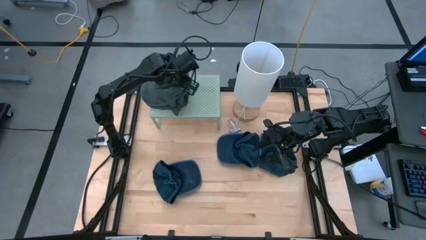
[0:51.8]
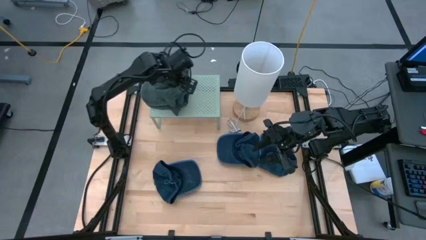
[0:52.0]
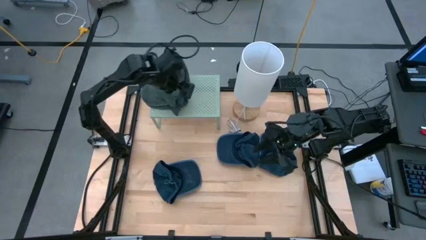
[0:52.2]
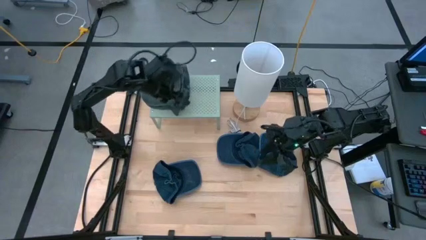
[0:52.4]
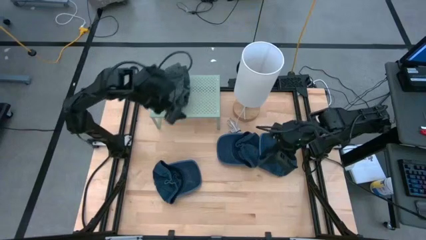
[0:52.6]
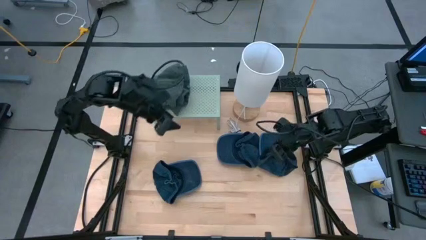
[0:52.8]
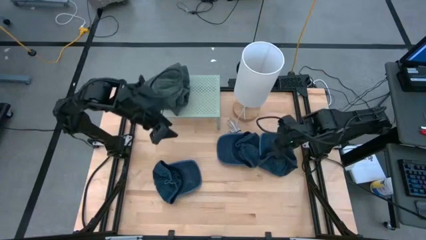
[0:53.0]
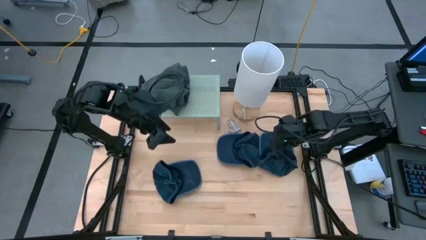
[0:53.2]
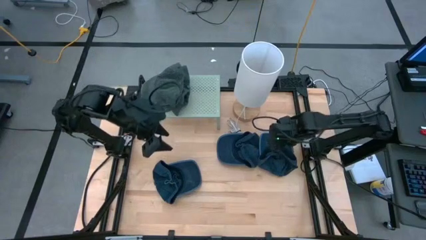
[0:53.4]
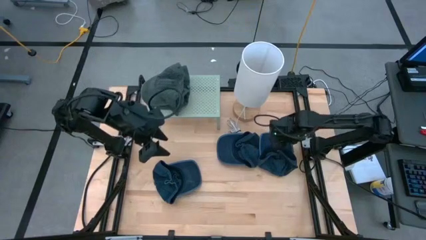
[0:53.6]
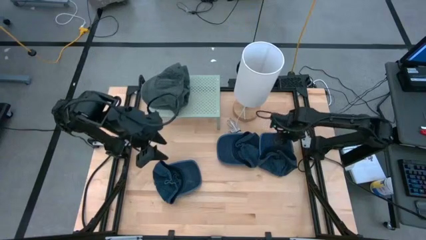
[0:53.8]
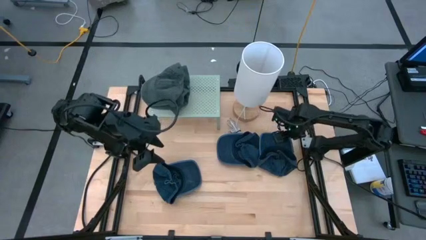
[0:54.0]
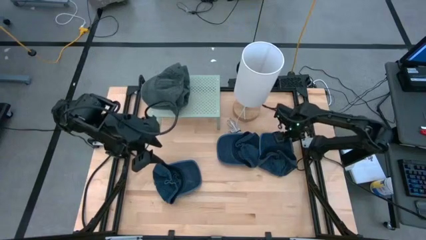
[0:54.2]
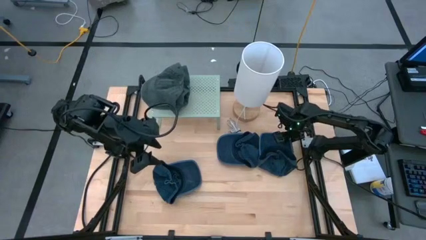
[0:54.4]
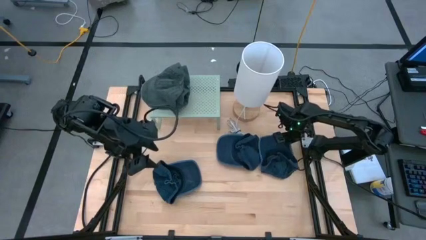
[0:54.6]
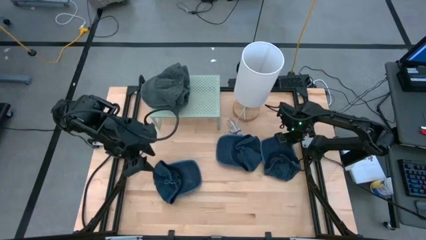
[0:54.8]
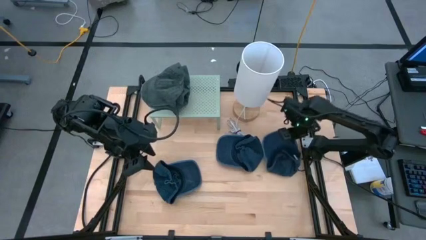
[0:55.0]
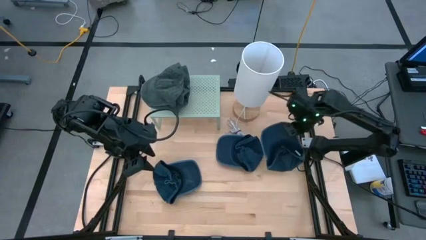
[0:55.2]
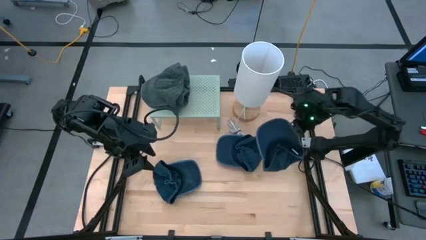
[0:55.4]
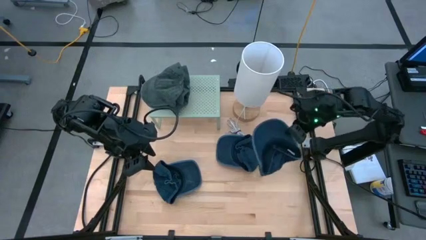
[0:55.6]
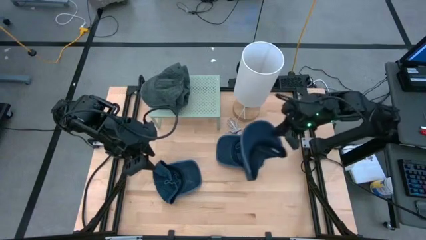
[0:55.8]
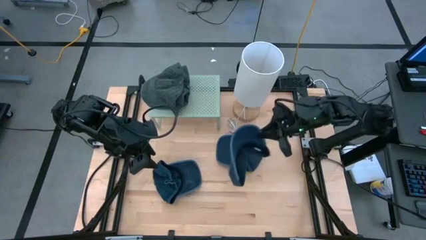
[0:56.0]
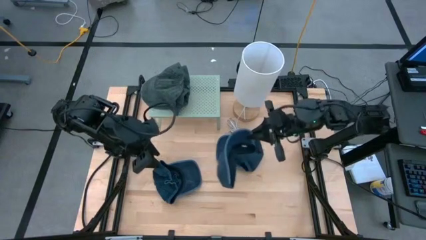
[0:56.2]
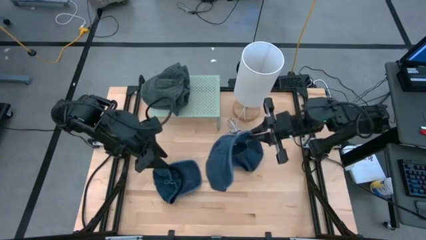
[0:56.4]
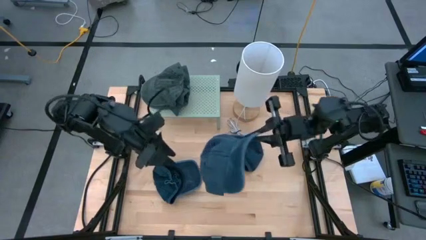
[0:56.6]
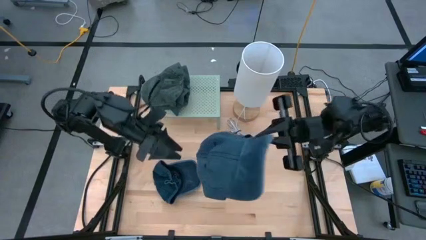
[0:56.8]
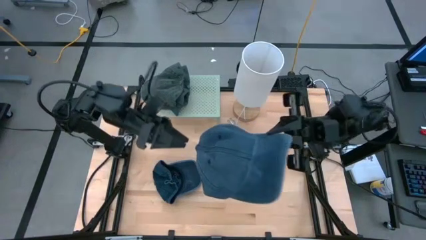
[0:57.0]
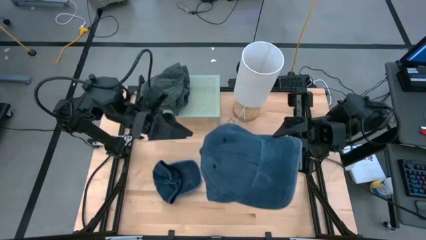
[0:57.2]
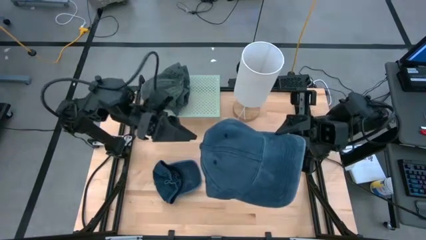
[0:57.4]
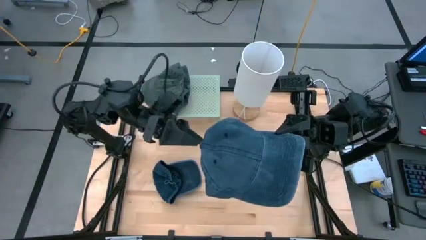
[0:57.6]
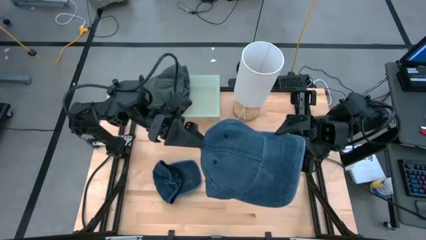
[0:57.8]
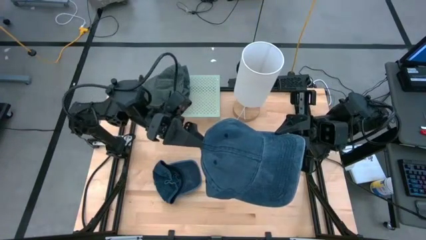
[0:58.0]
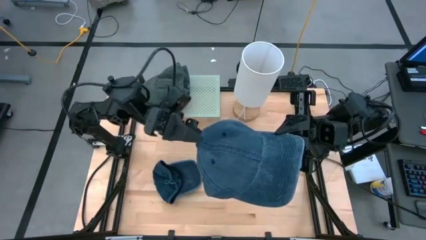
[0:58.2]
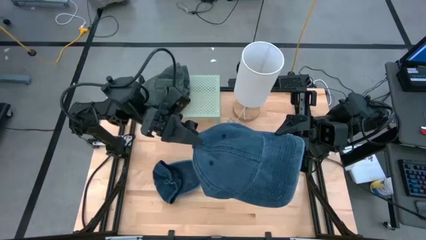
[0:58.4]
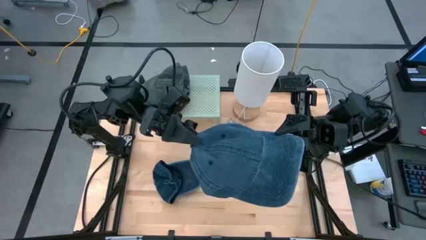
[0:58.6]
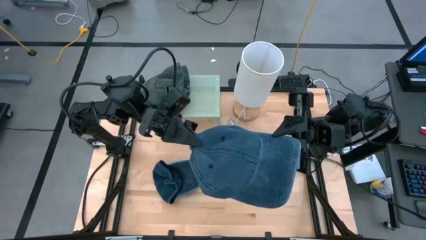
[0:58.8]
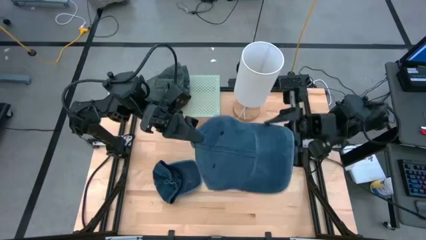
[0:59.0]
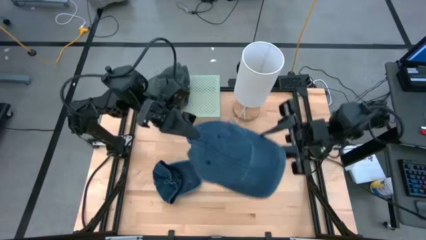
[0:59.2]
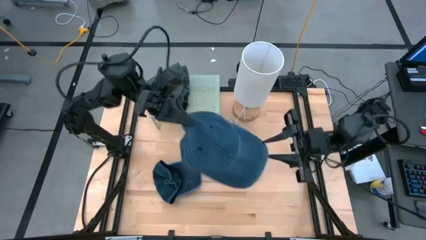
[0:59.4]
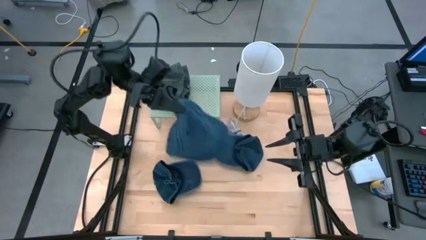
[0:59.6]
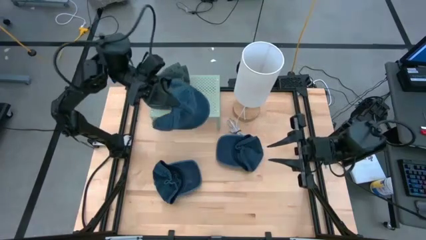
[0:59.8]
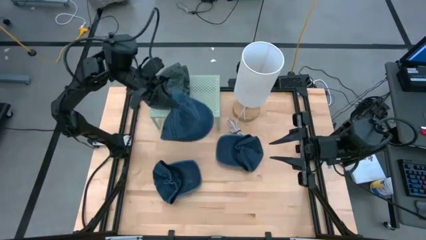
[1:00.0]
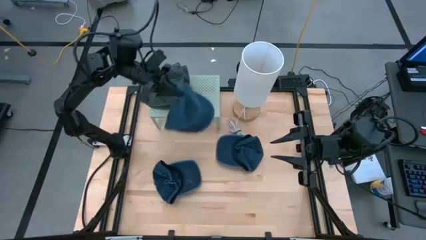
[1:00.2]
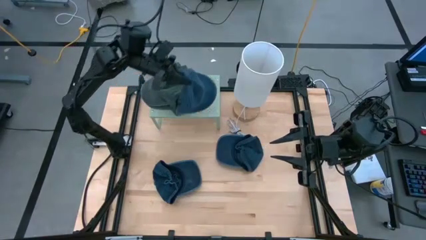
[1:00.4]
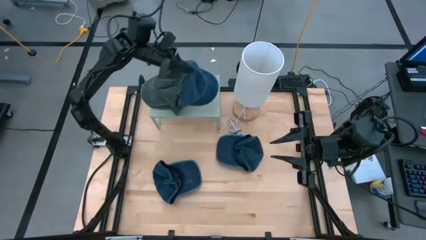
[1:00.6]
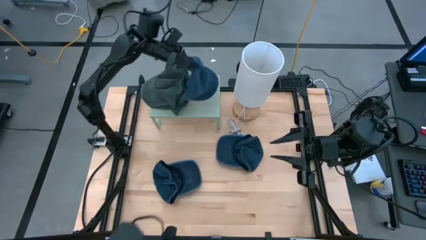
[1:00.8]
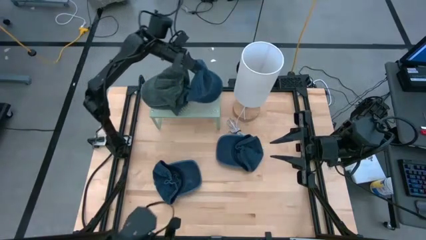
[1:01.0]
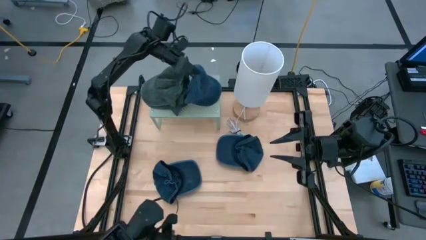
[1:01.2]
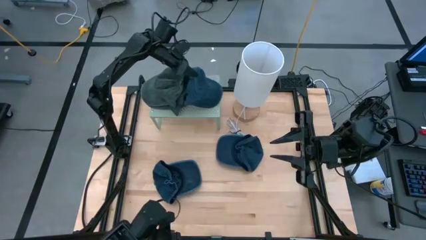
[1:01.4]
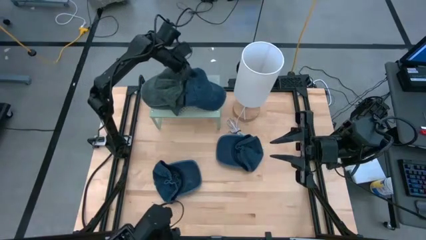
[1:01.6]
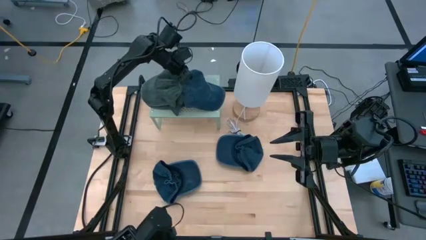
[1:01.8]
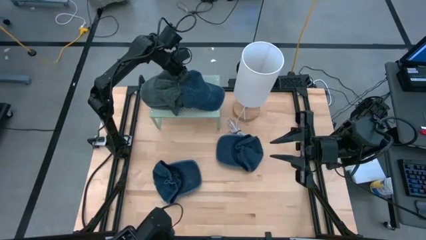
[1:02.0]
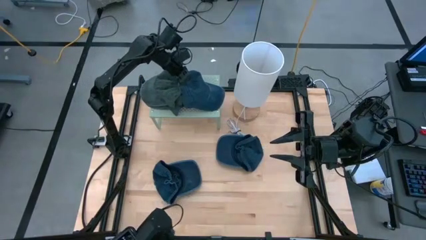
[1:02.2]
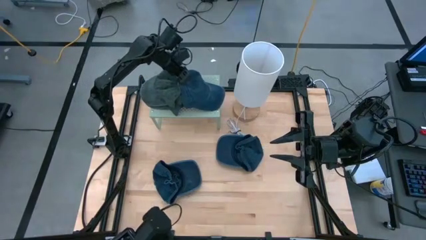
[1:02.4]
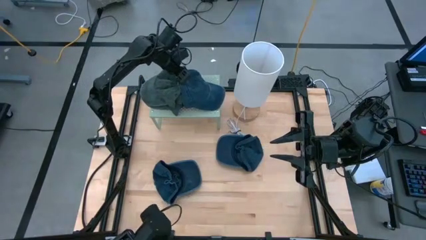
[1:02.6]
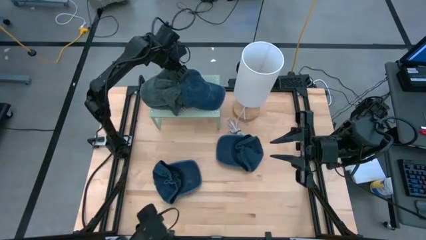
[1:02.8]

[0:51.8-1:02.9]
Task: Pick & Place hat
Put the right blue cap on the shelf
